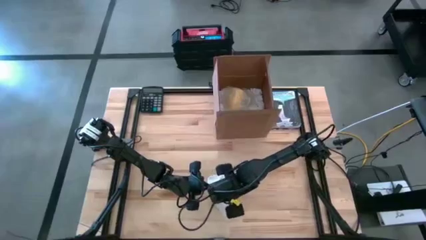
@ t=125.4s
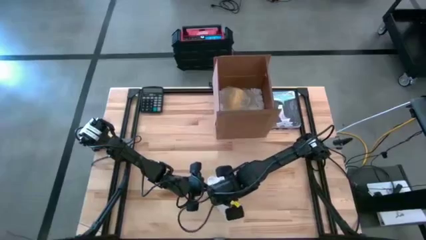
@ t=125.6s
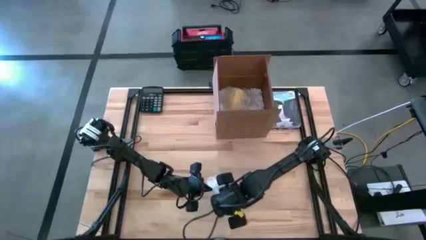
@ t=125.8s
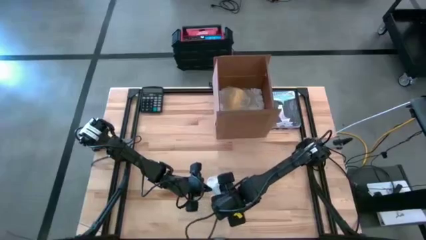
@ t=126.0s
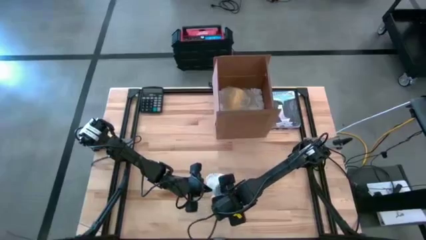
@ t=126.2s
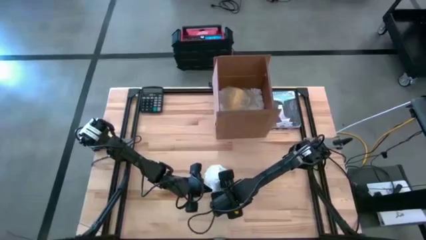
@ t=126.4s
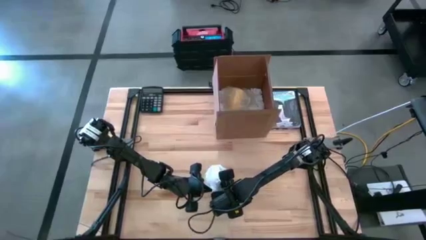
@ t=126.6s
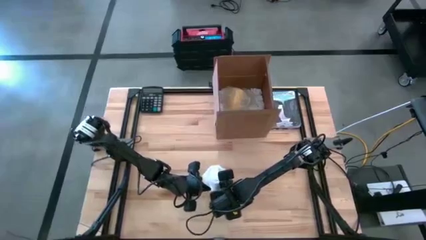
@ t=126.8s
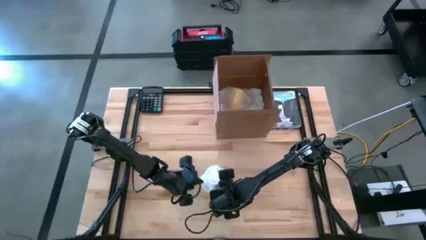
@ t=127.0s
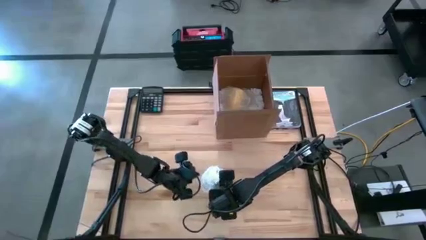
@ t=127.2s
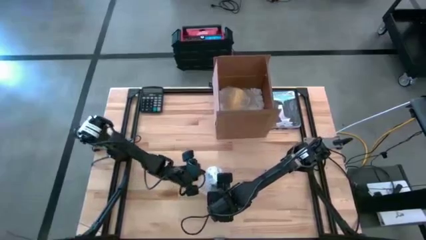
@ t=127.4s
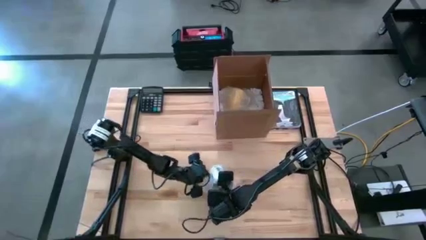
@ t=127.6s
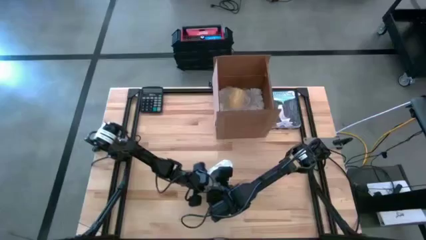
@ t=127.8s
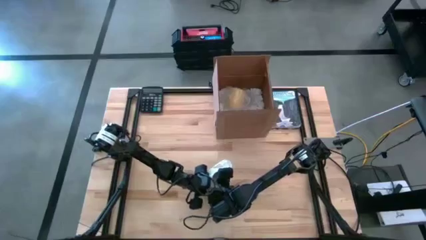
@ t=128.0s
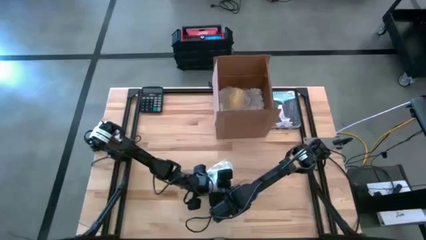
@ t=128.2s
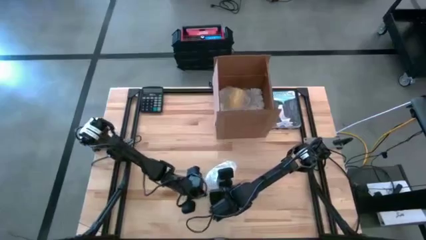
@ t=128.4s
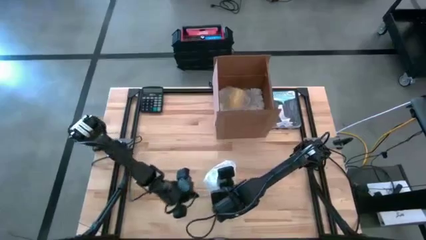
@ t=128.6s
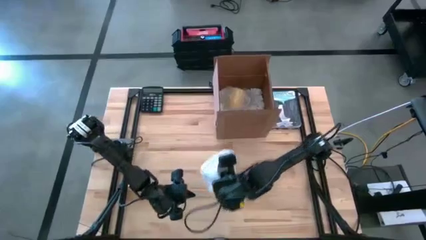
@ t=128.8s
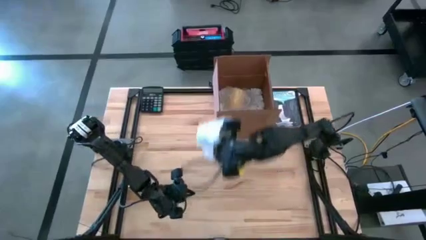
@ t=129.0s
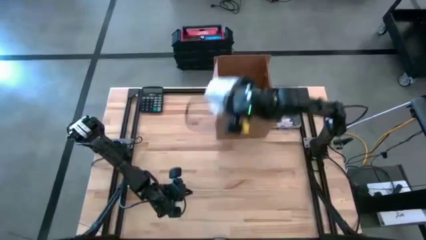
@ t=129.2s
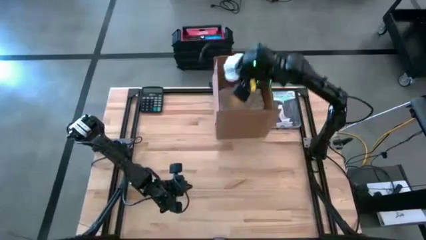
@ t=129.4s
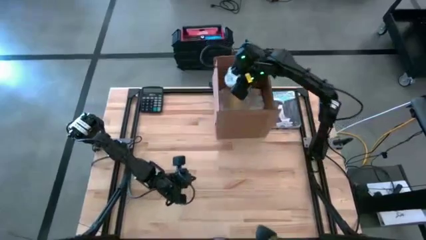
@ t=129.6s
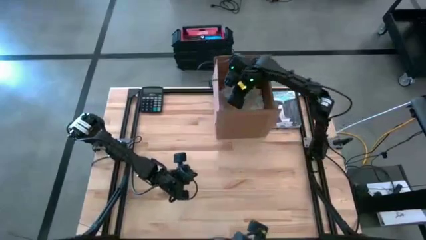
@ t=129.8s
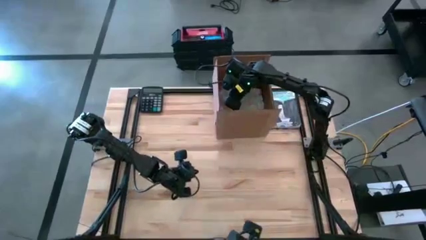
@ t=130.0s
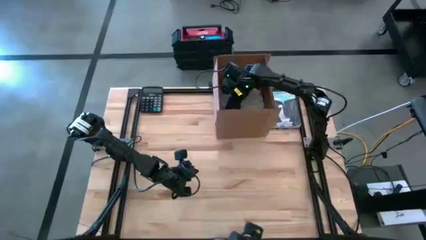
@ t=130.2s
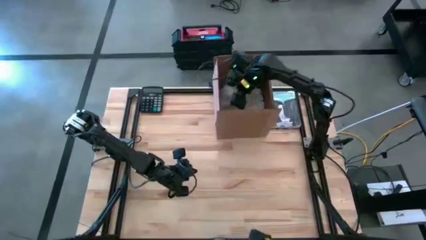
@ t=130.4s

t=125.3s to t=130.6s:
Task: wrap mug
Put the blue patterned mug into the brown cardboard box

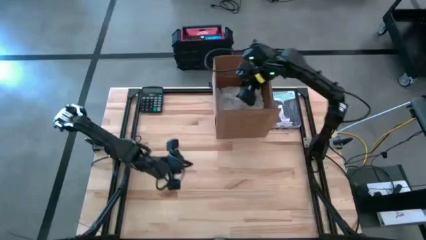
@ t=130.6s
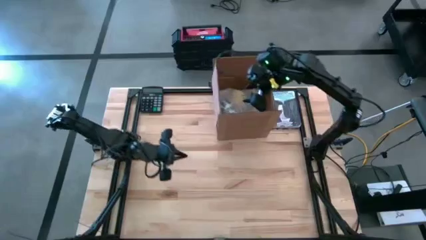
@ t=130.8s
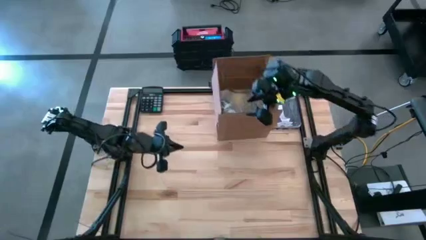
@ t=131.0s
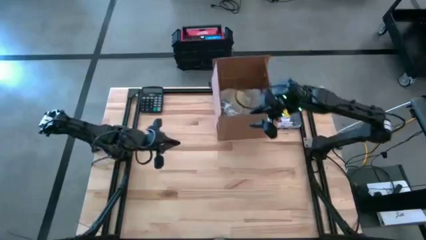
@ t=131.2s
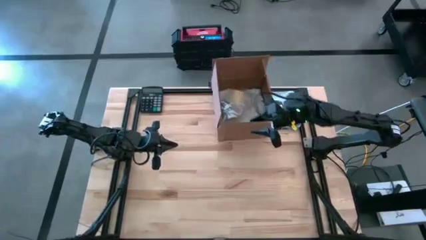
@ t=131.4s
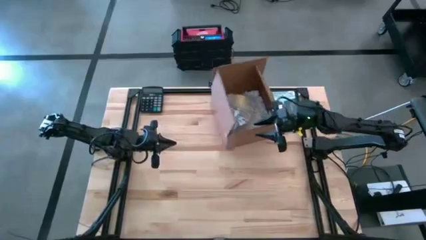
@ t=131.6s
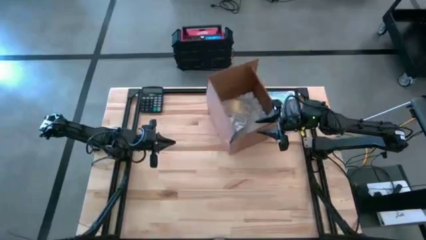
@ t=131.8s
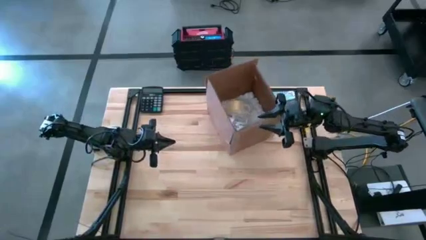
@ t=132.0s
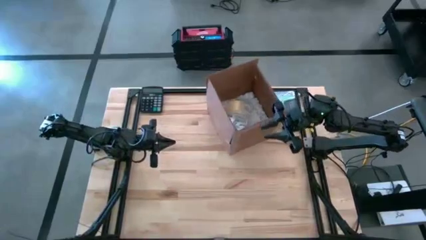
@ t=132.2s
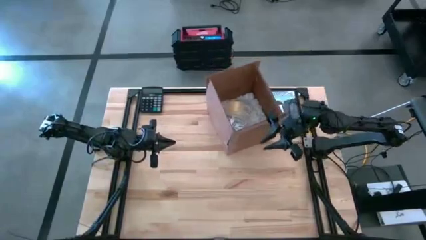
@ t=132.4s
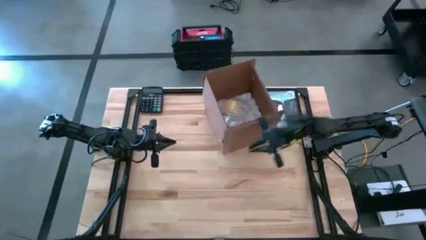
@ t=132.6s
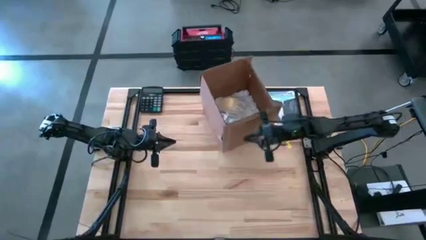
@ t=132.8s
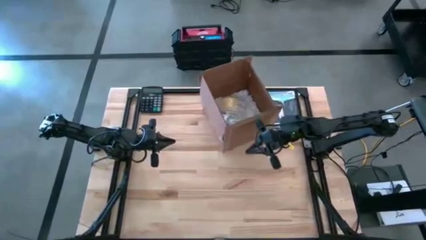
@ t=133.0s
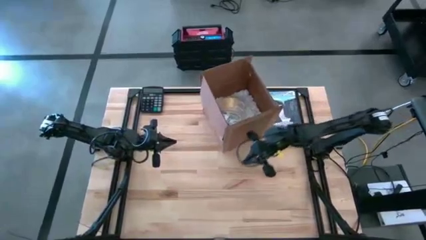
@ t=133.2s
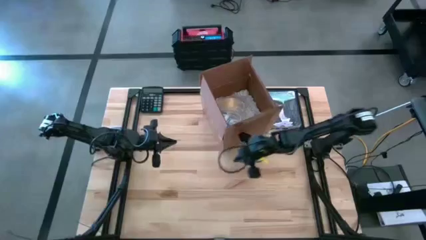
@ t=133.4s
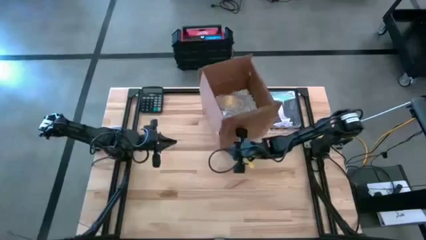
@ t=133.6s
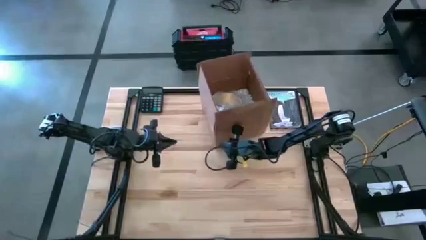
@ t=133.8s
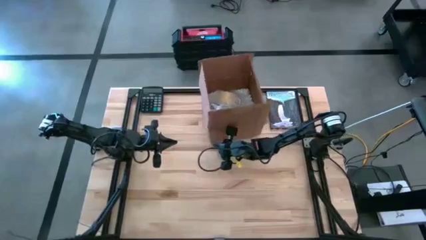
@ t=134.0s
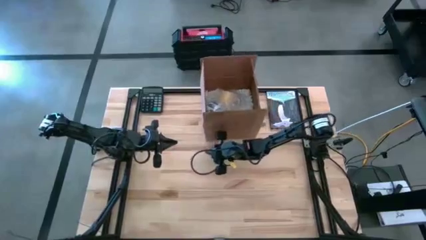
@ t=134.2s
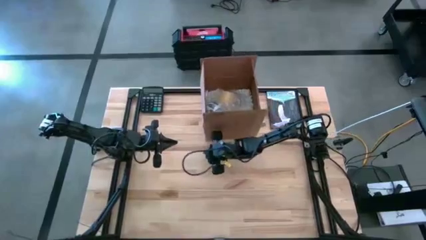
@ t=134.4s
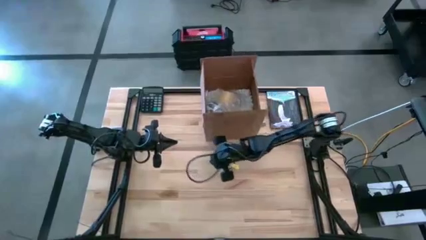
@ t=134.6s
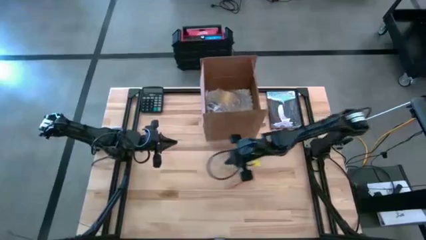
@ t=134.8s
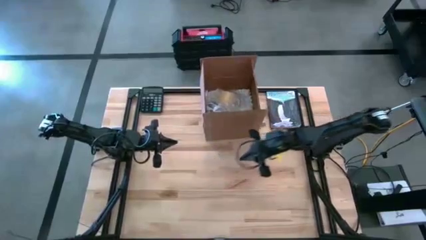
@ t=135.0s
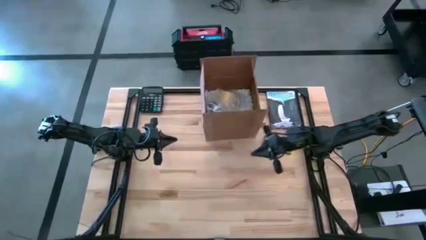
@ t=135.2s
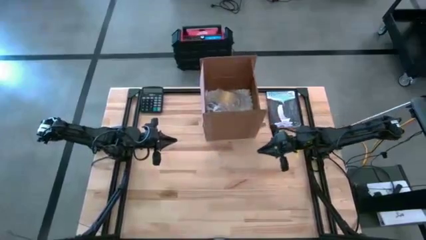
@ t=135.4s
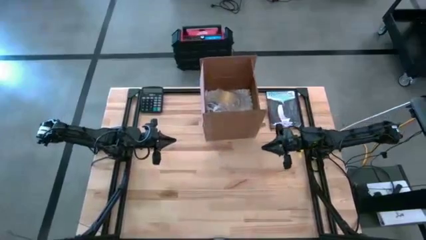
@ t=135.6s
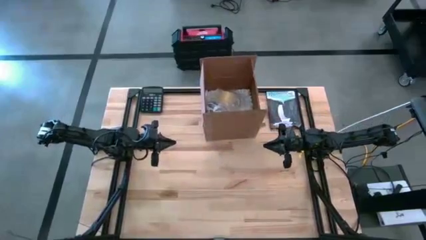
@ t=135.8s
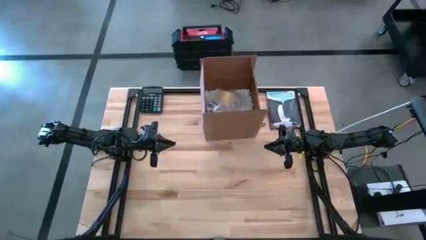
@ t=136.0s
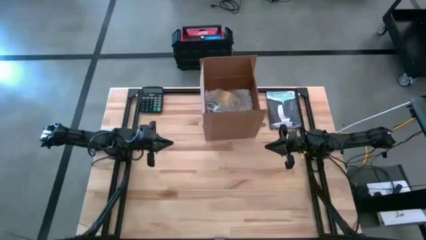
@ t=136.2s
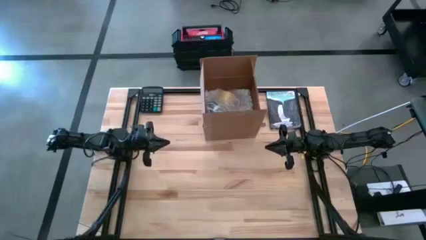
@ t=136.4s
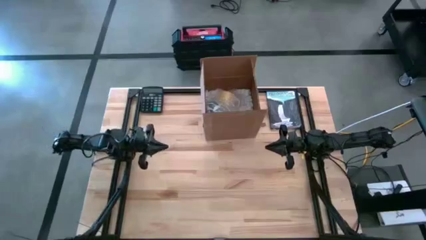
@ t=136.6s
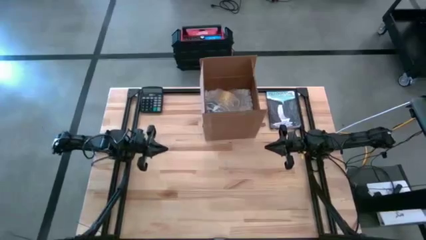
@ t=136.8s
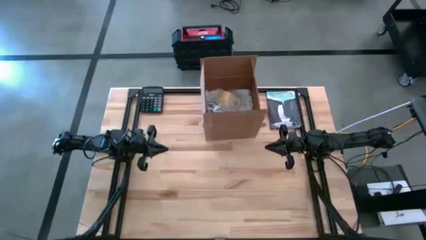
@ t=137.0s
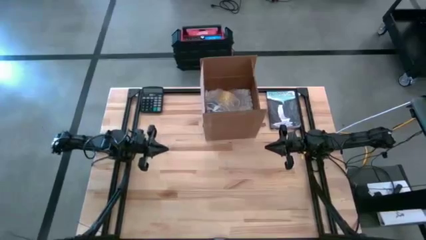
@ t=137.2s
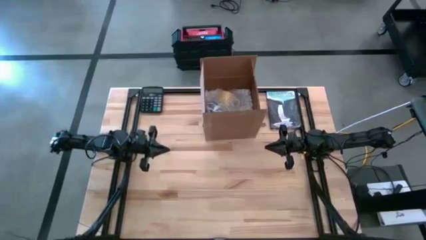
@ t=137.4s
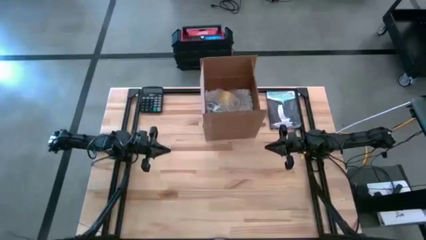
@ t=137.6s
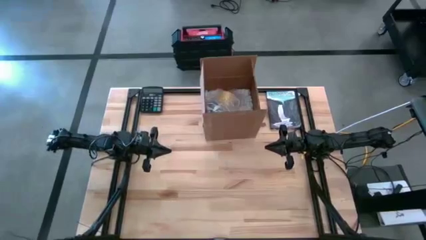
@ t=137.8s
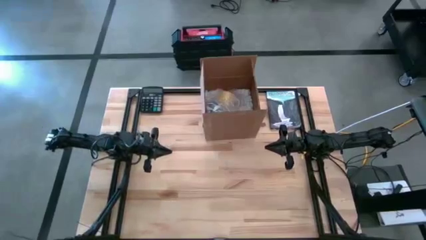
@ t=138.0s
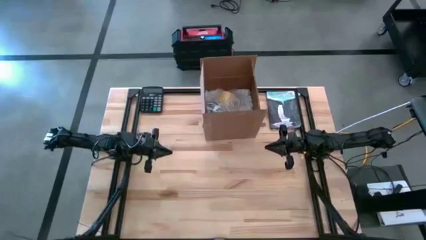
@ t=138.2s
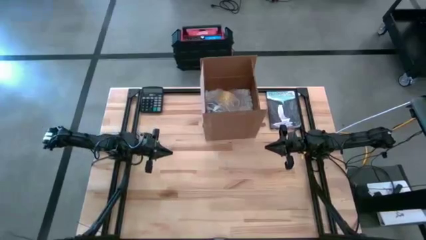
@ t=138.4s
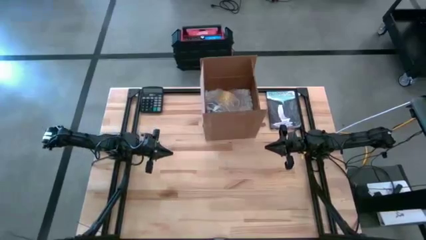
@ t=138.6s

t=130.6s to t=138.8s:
Return to Home Position
